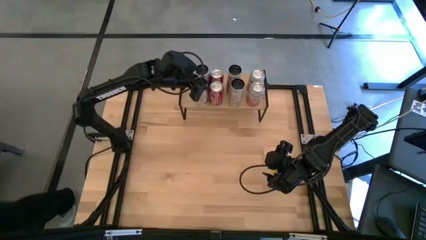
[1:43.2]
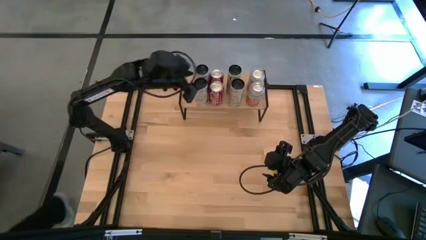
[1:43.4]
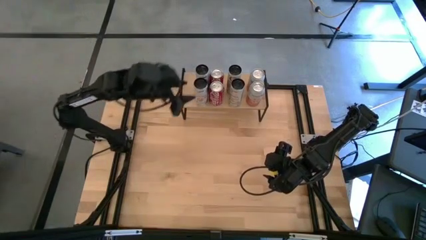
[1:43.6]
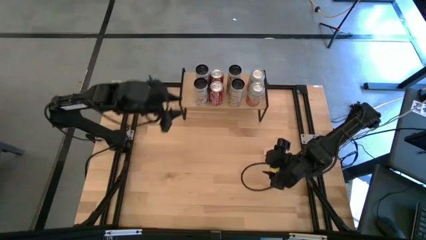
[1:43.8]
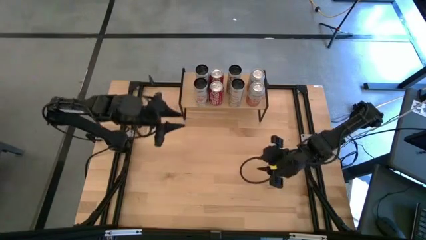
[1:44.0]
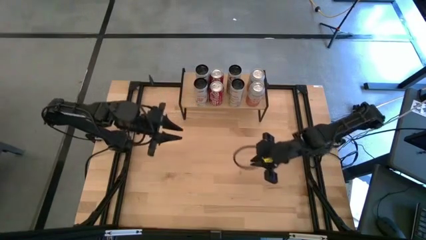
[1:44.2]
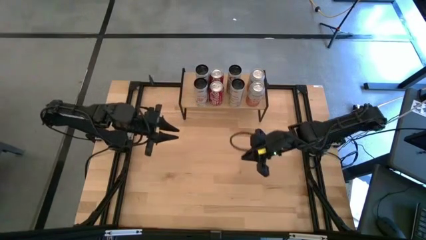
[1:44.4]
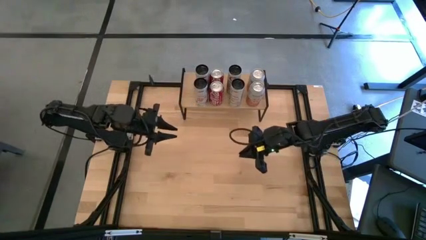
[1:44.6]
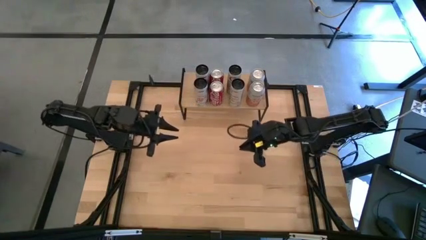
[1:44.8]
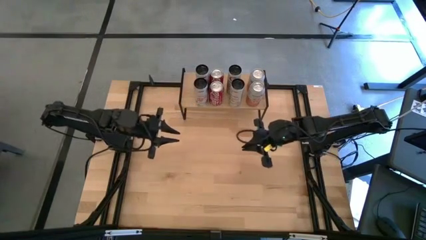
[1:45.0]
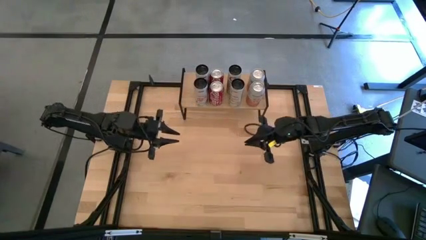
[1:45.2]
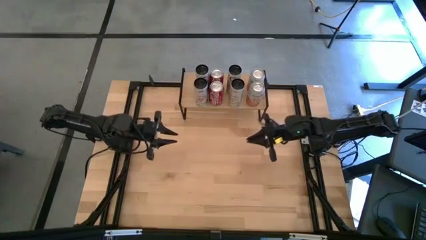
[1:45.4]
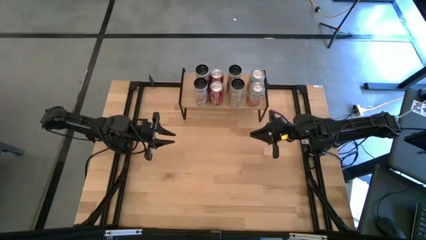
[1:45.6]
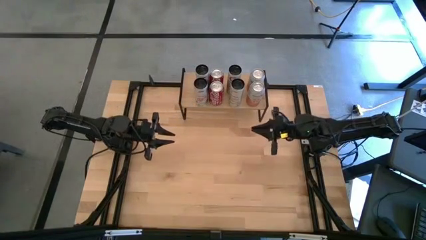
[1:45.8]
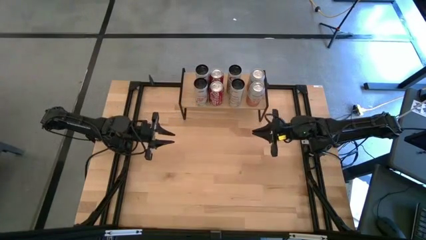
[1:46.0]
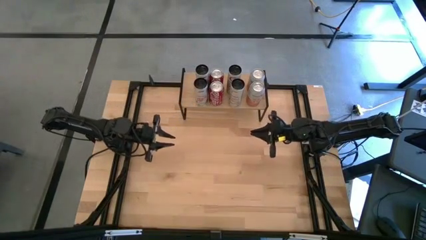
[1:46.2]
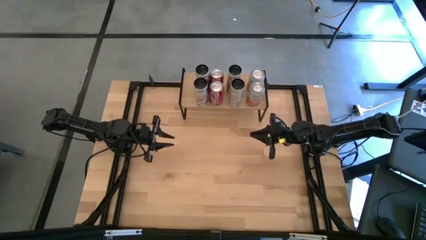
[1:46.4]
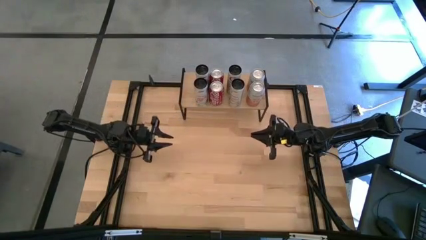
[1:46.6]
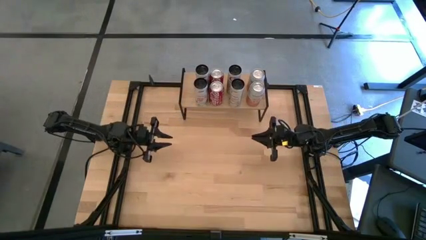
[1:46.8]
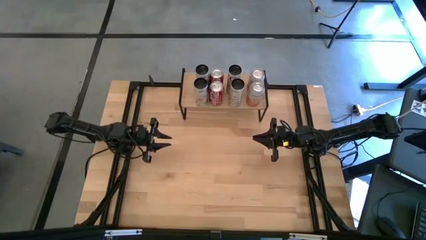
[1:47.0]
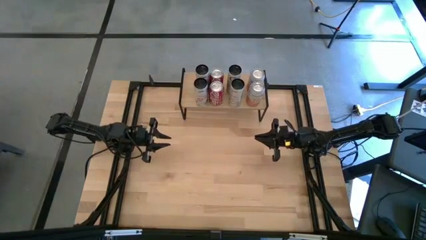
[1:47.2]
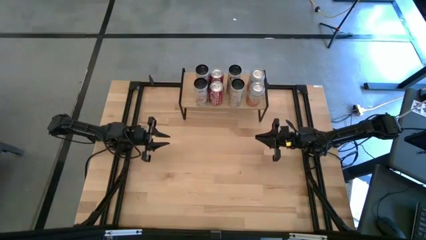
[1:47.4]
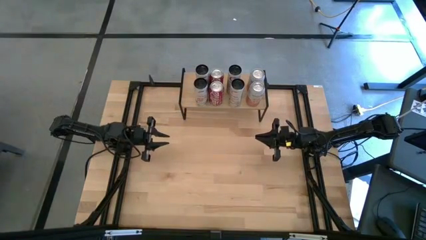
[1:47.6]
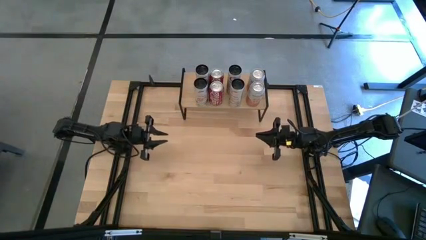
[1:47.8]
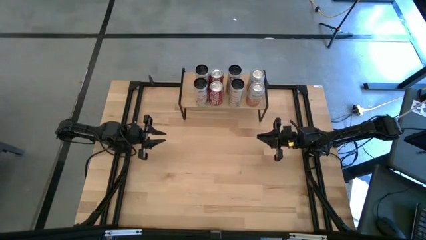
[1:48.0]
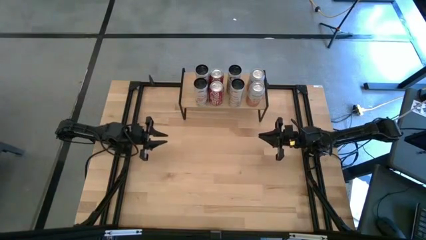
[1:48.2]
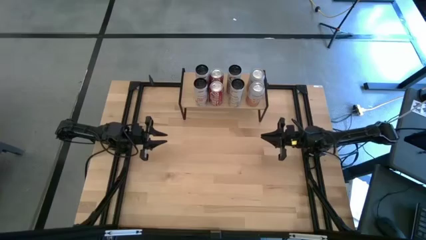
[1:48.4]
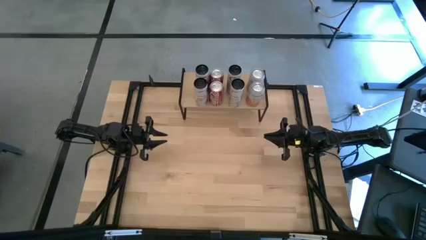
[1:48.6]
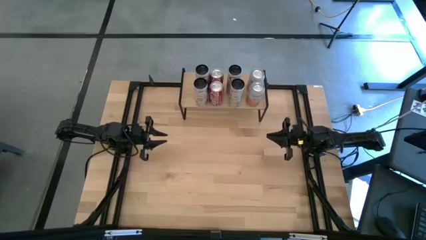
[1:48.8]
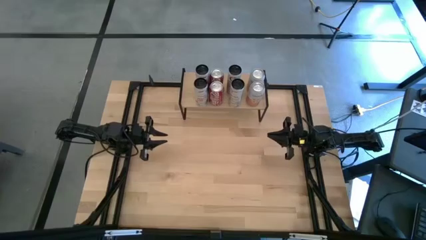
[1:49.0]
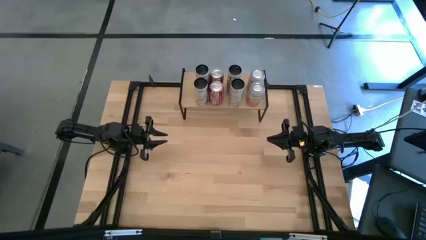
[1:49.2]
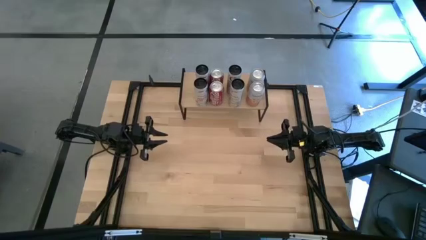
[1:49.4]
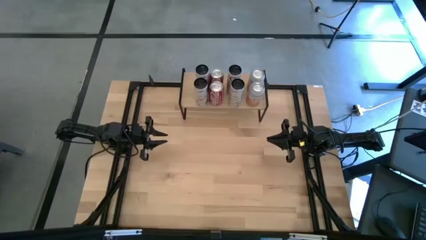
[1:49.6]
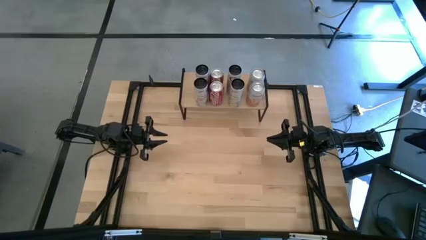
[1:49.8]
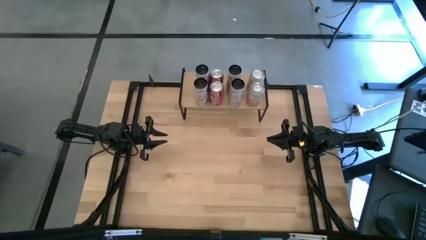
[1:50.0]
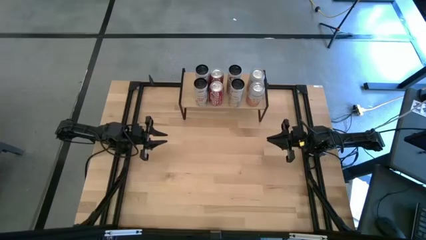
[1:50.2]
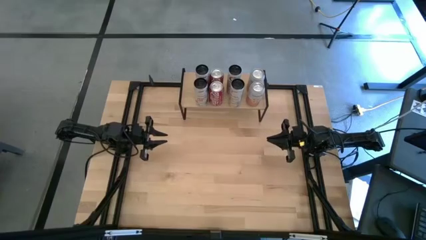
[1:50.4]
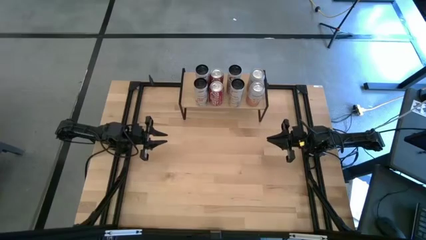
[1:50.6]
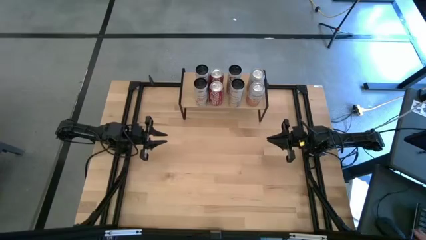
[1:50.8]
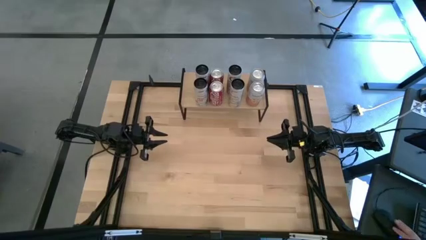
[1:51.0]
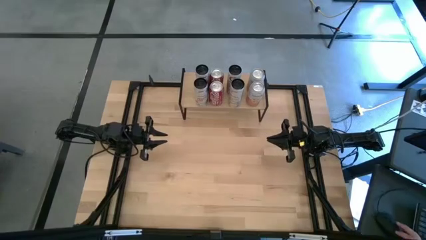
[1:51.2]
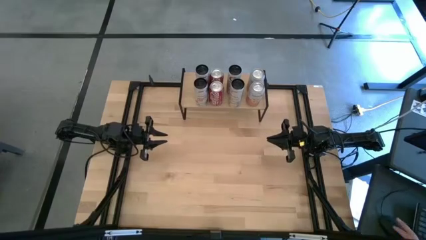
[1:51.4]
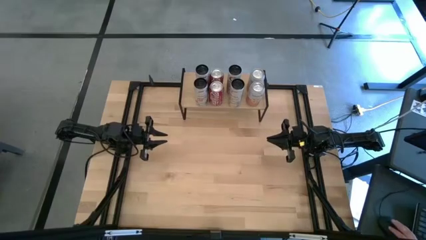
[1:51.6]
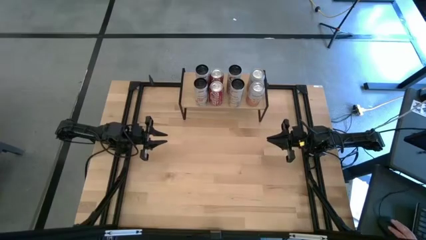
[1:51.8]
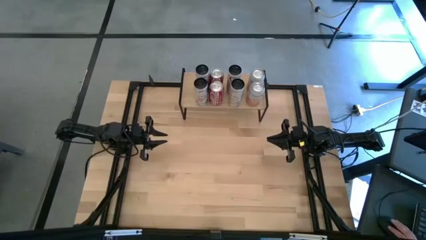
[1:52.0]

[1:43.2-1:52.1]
Task: Place canned beverage on shelf
Return to Home Position

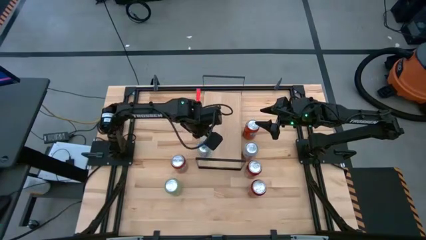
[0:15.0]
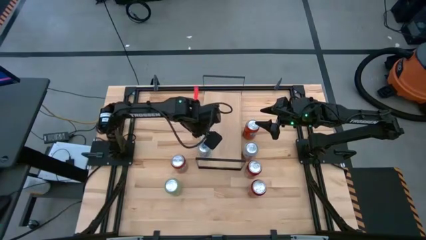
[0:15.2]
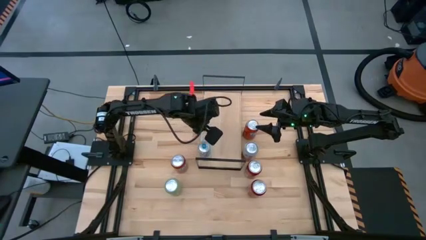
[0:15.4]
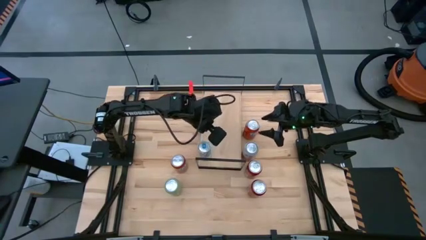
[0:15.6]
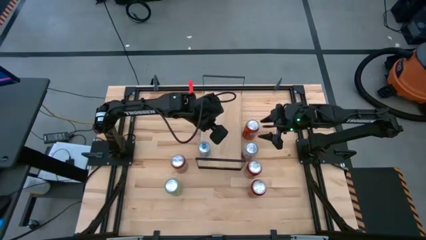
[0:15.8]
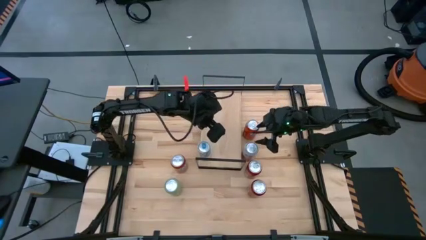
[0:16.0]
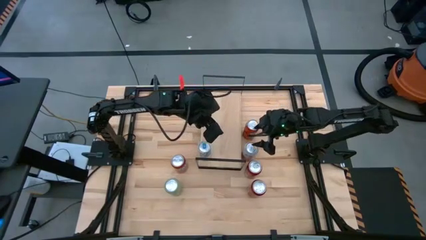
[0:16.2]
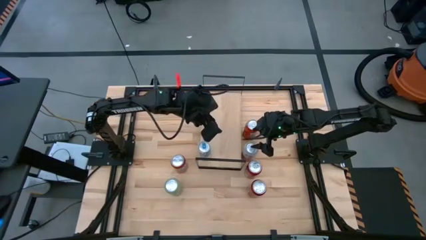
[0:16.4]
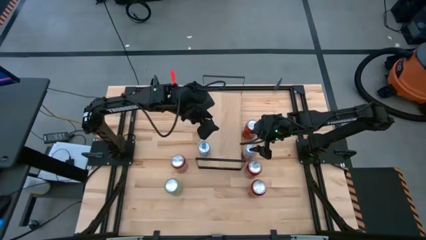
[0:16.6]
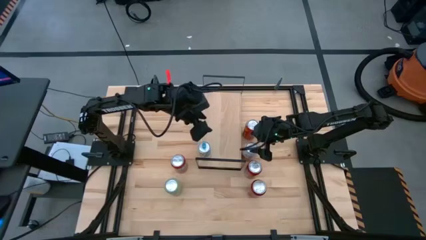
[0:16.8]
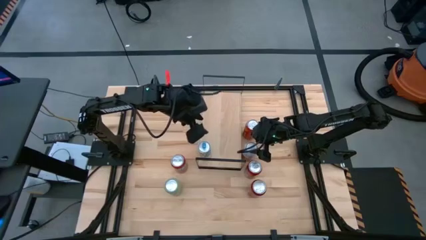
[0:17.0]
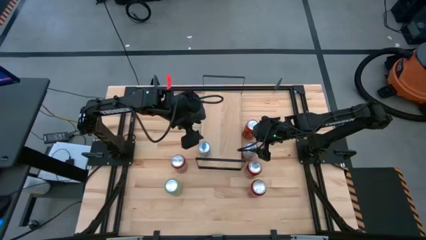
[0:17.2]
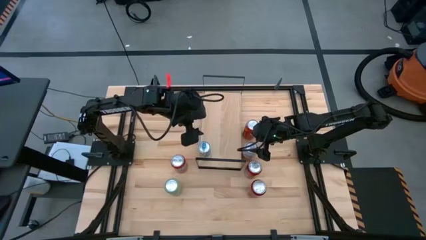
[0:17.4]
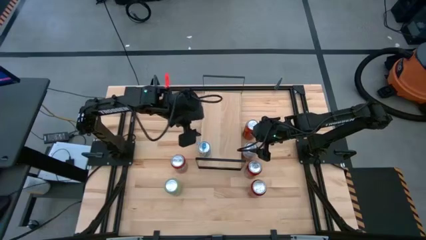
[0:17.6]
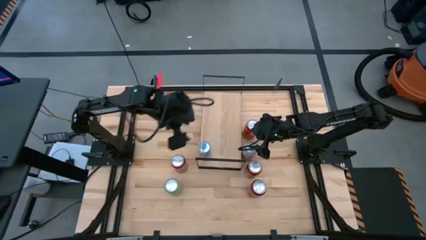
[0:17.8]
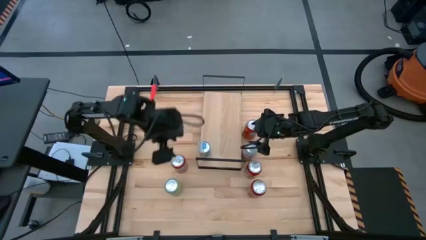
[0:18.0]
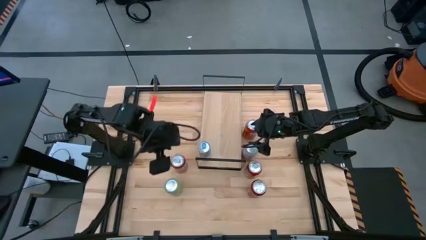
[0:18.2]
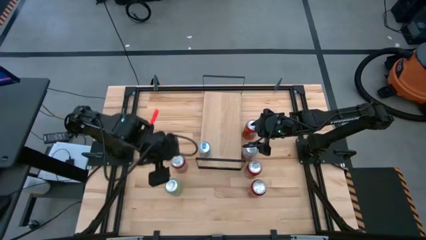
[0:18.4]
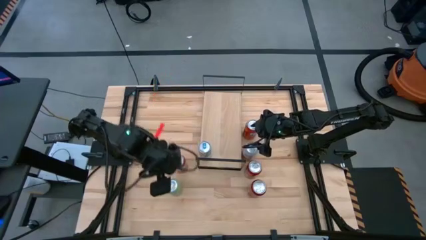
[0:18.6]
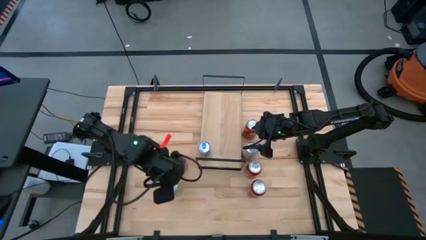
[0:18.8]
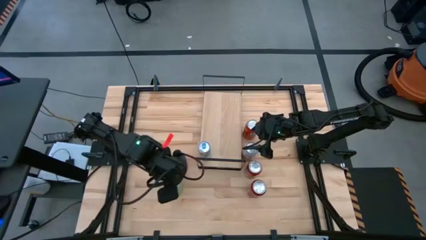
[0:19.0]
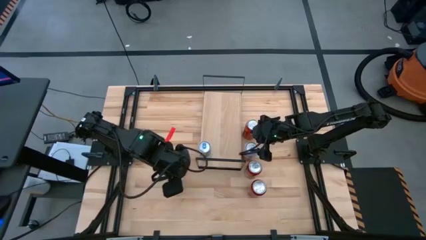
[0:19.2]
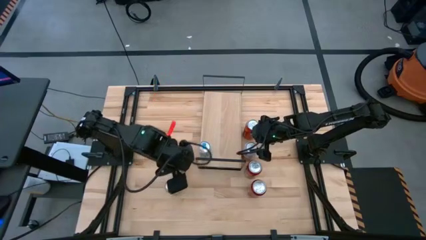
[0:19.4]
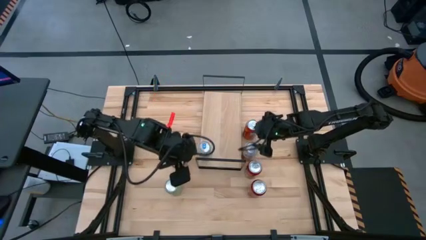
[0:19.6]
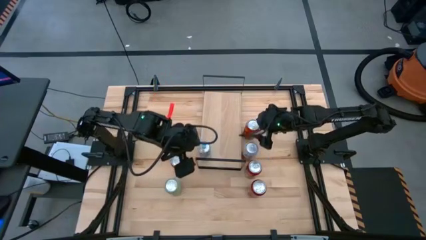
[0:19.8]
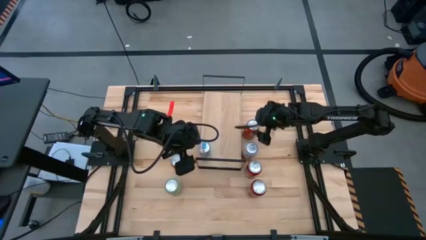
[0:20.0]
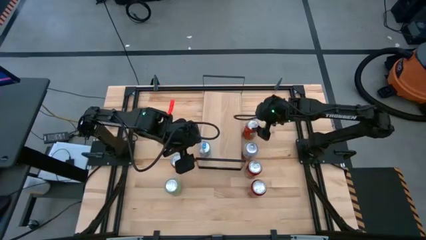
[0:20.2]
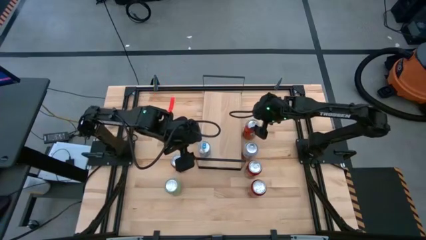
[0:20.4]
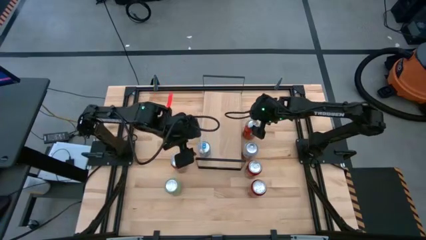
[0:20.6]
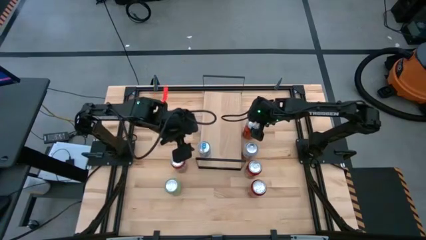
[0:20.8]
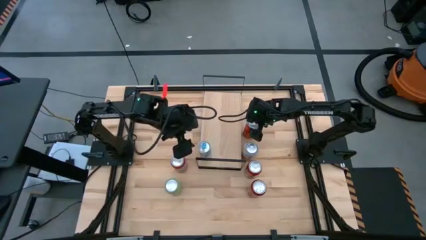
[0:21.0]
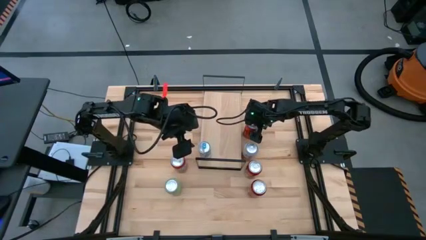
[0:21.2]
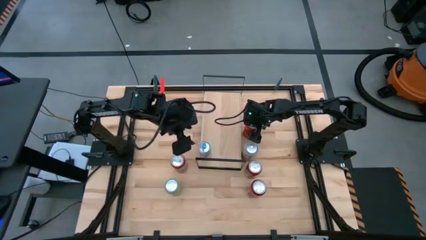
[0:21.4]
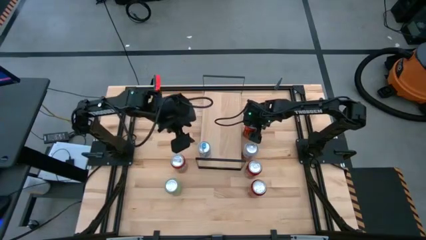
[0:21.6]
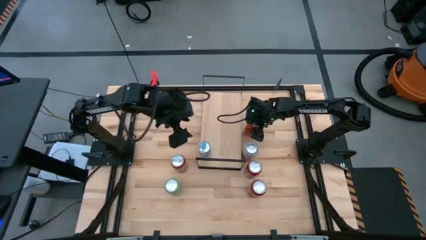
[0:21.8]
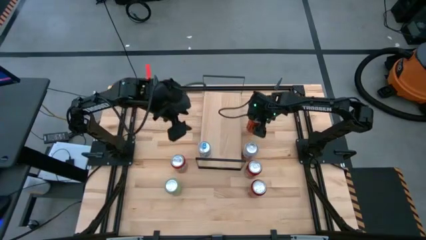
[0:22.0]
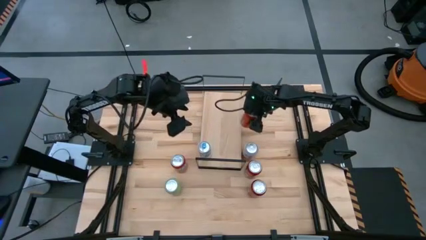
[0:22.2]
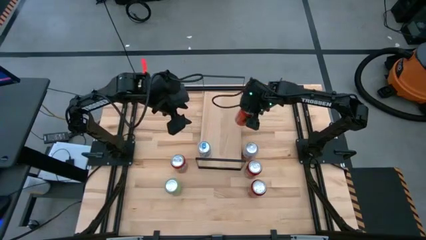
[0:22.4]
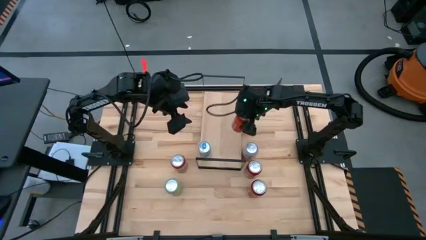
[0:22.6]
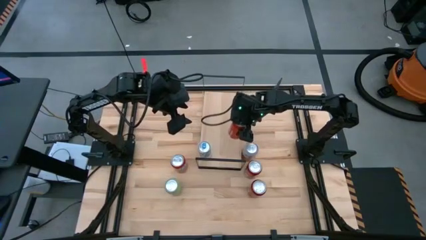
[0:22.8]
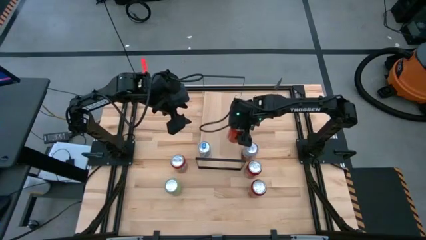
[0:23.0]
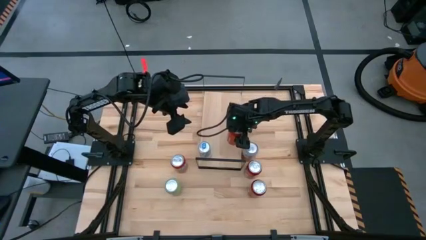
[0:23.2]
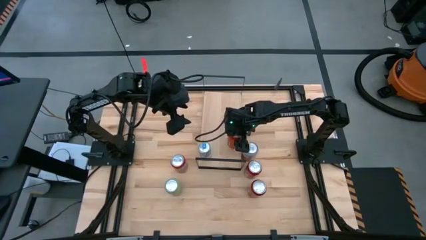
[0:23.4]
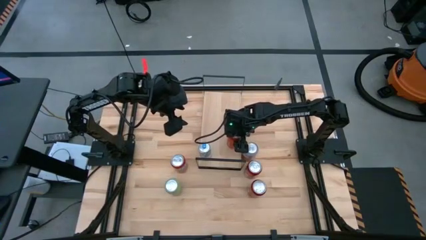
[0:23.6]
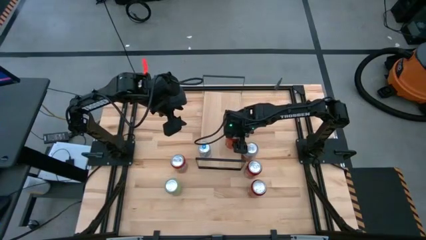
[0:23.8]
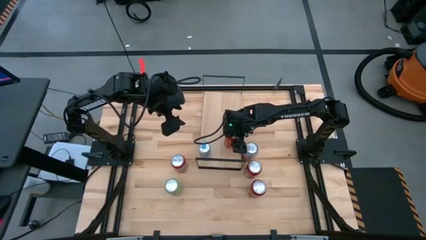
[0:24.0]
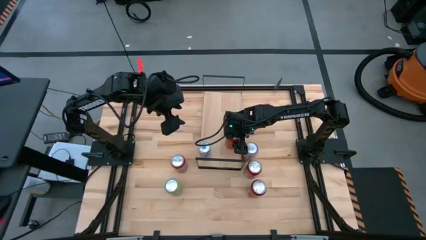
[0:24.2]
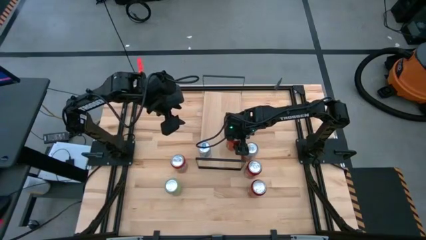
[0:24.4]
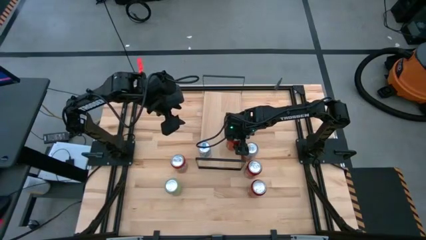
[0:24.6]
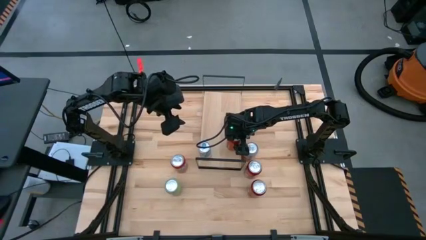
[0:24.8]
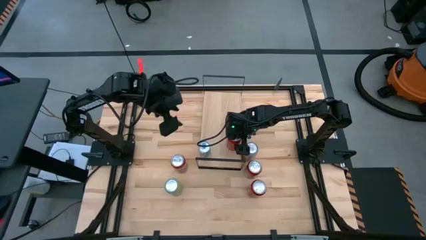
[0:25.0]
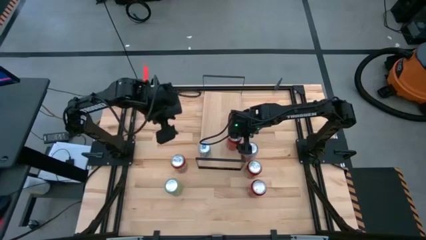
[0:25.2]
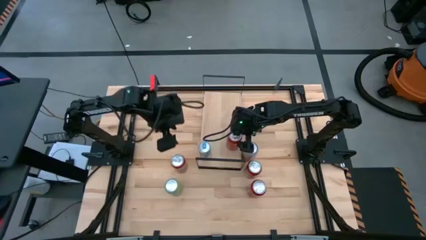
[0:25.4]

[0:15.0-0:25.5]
Task: Place canned beverage on shelf
Put the right red soda can on the shelf
